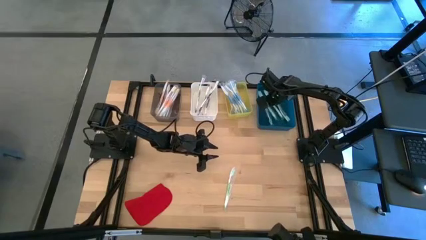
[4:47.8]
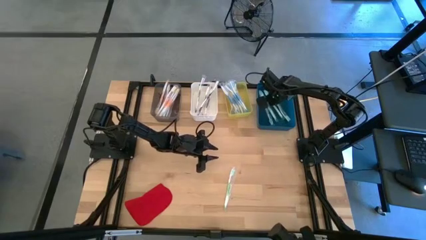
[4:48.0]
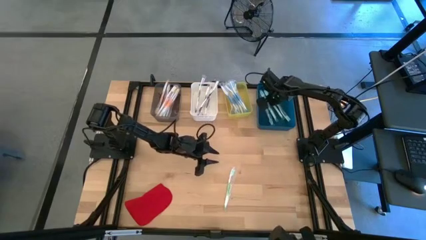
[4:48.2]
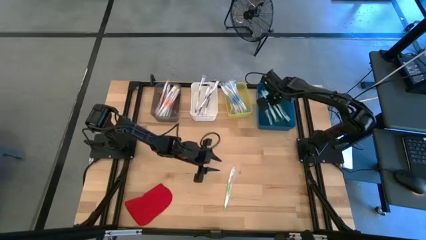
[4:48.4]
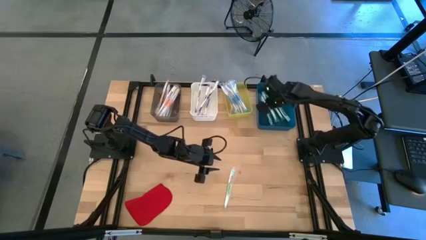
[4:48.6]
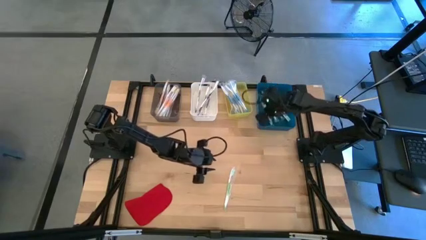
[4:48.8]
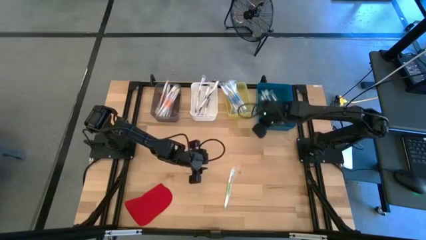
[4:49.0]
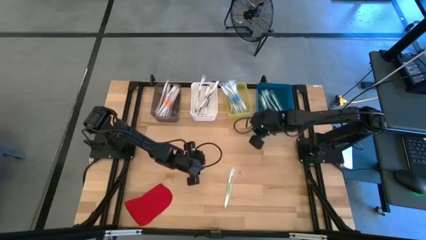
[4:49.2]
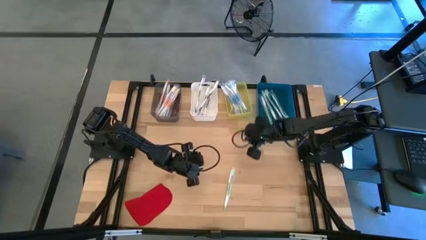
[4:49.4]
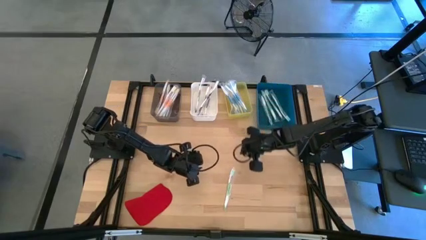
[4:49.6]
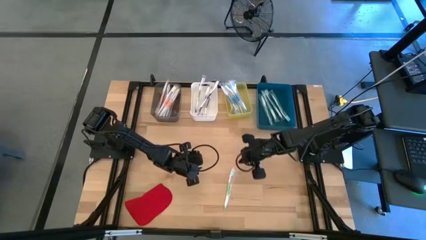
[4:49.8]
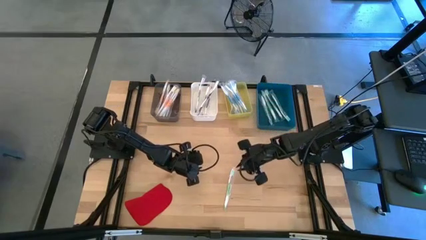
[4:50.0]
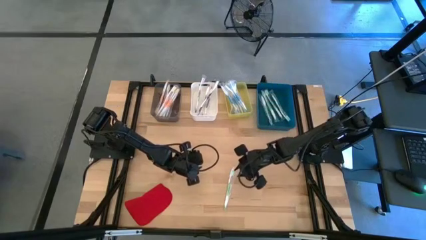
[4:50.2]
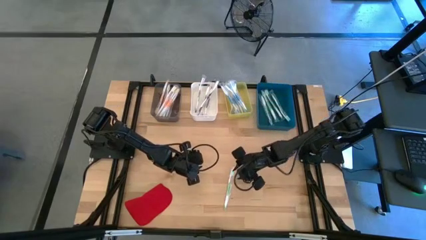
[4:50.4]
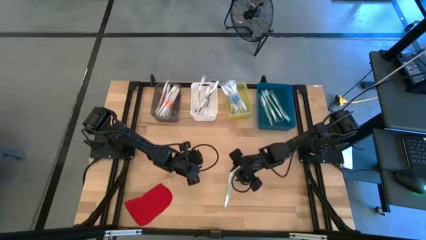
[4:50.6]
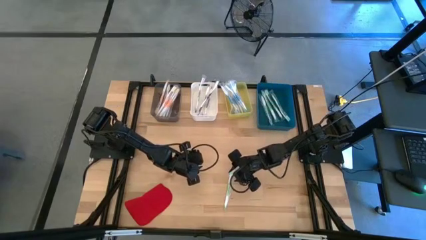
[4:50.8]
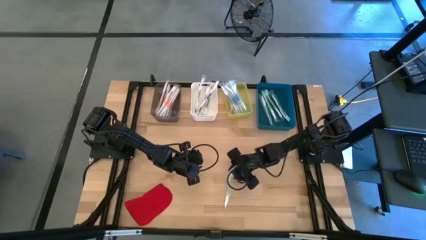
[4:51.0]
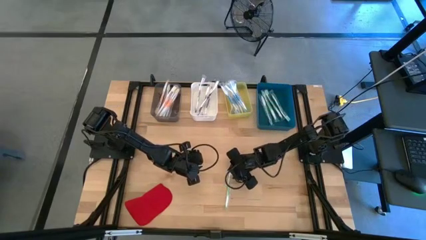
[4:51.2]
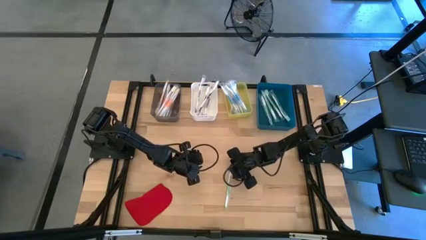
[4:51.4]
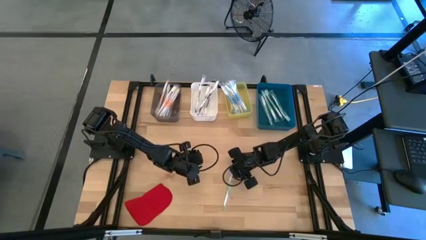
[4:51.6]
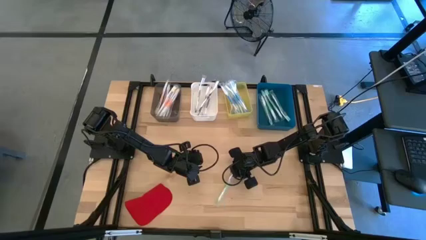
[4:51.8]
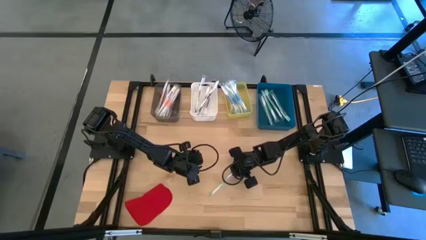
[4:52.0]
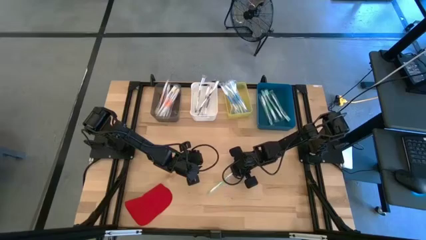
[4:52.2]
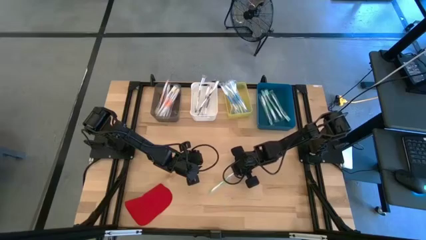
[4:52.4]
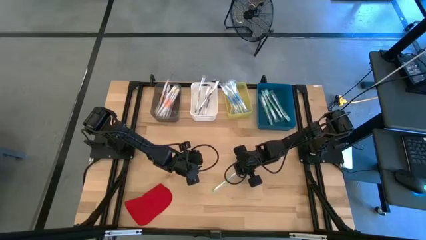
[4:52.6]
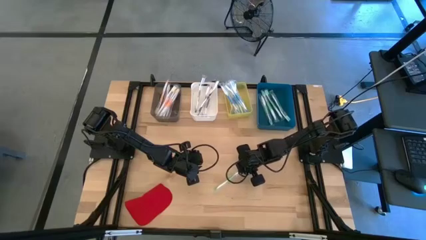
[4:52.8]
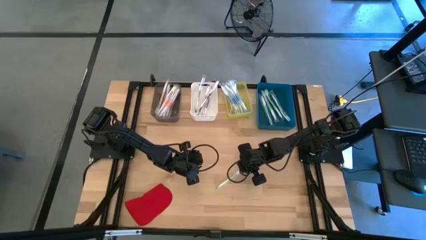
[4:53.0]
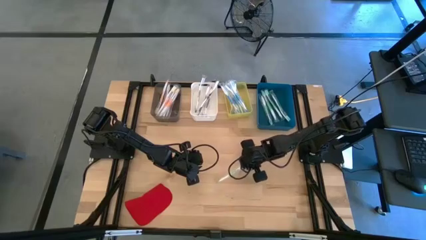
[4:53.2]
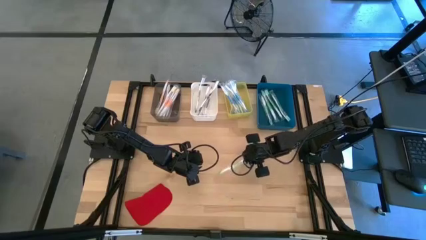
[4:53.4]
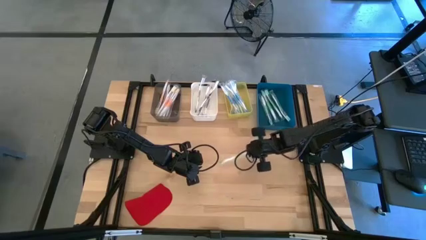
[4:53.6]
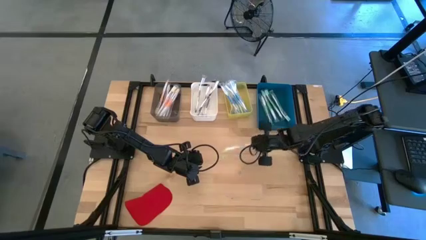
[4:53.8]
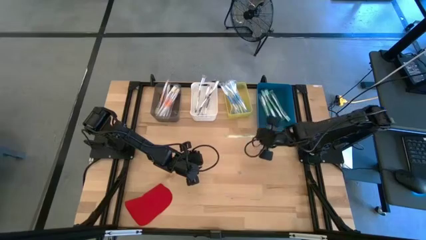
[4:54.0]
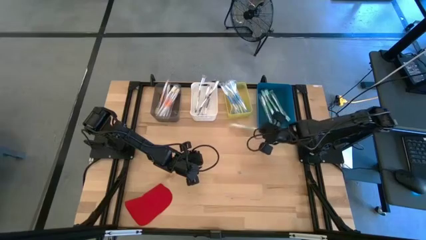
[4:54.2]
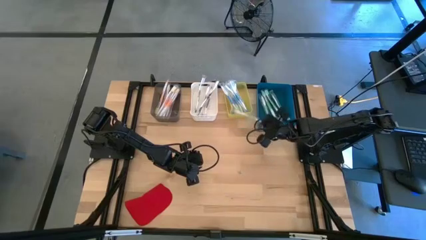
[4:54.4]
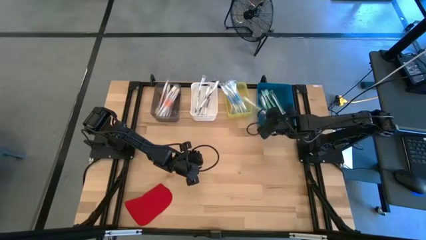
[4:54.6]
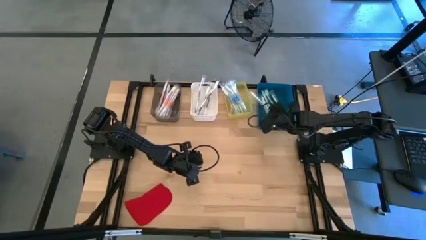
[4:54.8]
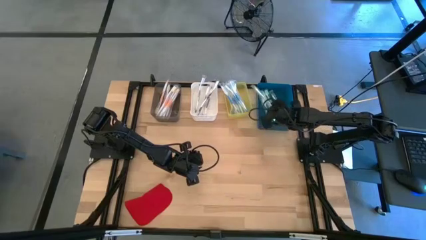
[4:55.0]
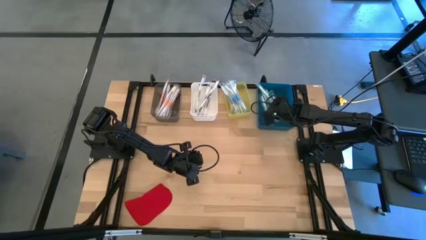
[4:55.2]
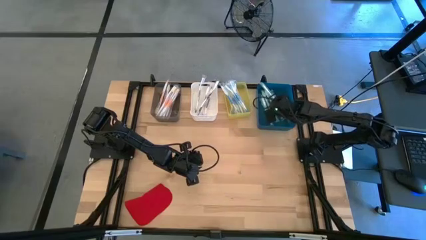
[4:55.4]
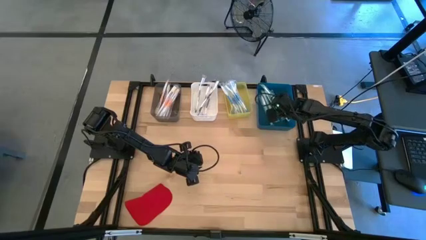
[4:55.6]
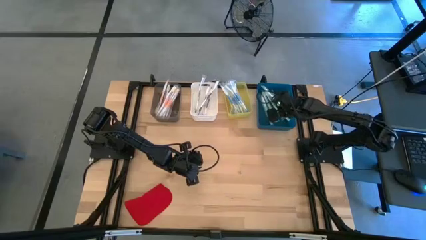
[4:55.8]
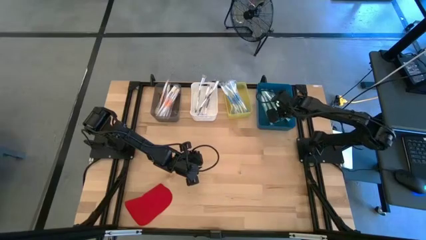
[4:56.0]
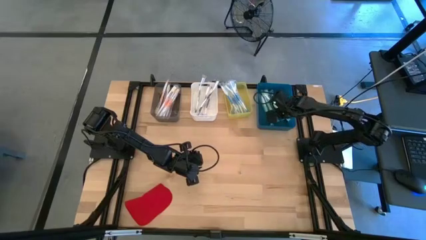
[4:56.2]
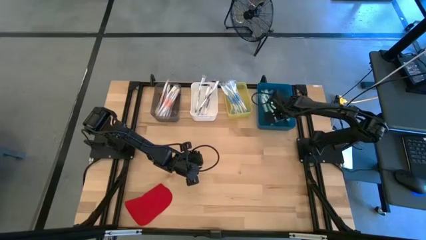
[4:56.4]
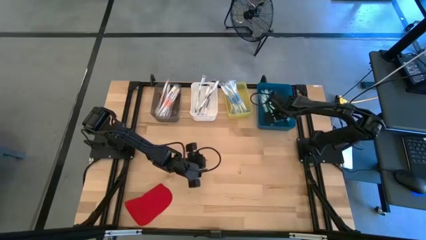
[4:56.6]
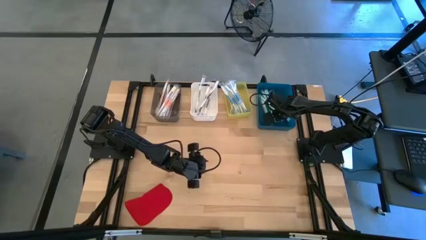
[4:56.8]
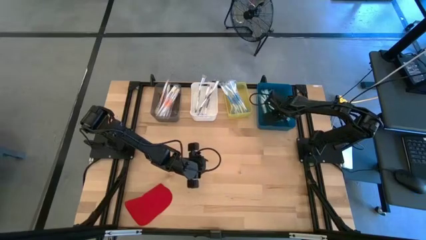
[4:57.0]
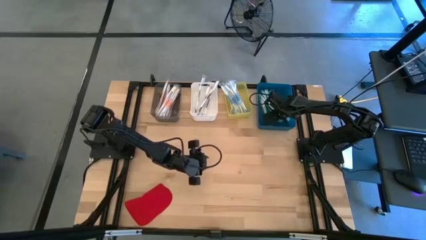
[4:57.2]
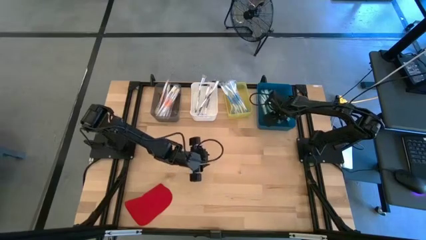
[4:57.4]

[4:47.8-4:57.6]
Task: Pick & Place Toothbrushes
Put the green toothbrush into the blue bin

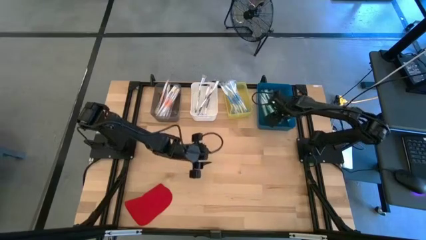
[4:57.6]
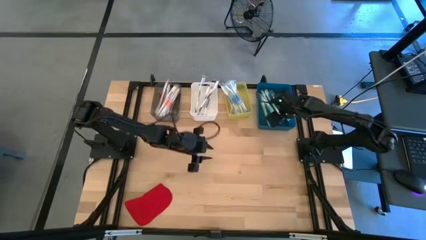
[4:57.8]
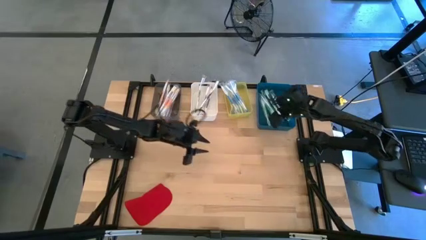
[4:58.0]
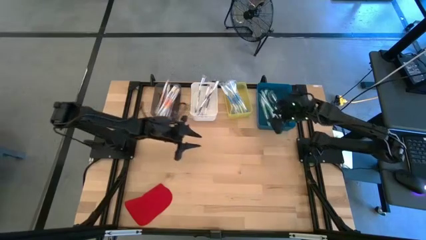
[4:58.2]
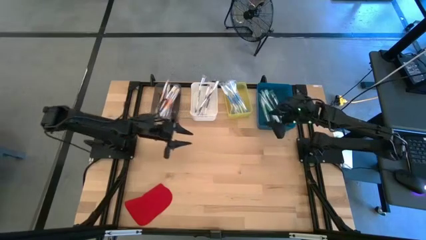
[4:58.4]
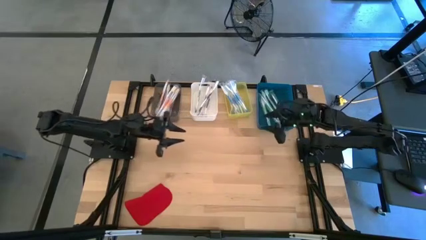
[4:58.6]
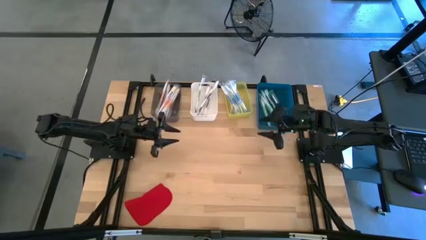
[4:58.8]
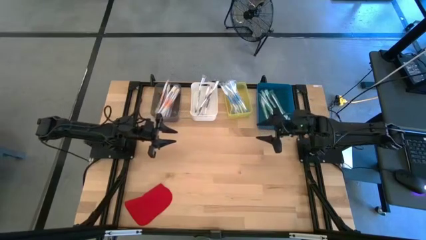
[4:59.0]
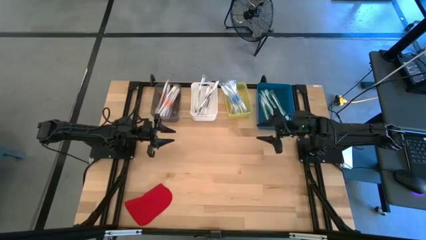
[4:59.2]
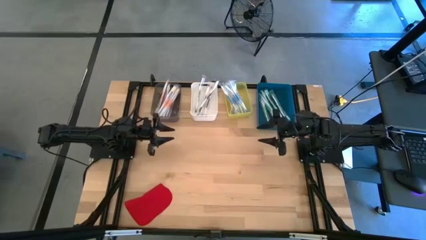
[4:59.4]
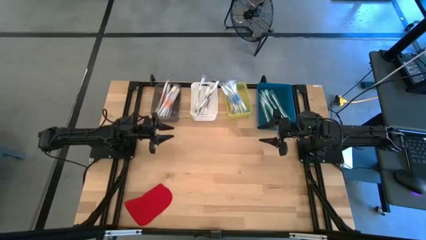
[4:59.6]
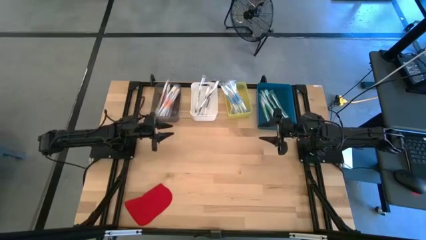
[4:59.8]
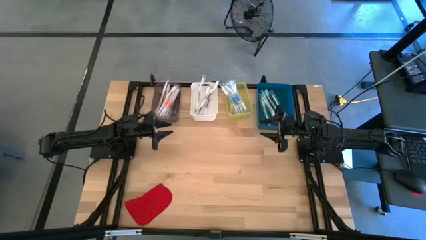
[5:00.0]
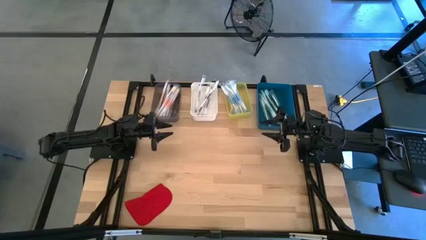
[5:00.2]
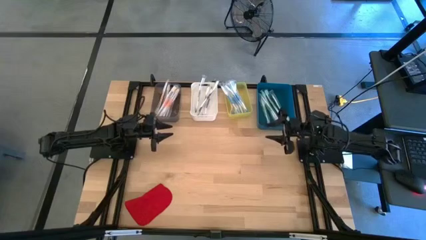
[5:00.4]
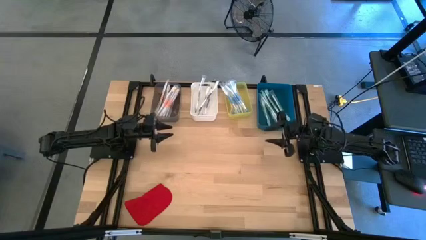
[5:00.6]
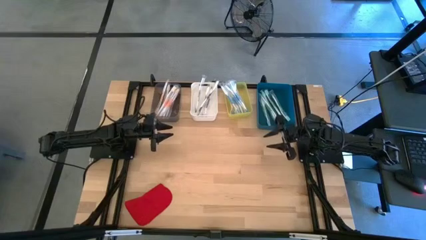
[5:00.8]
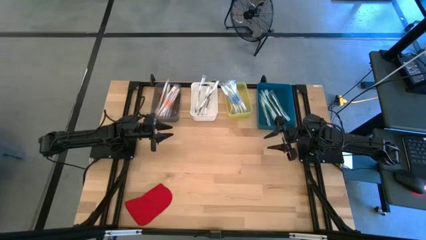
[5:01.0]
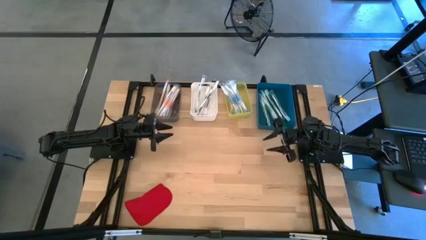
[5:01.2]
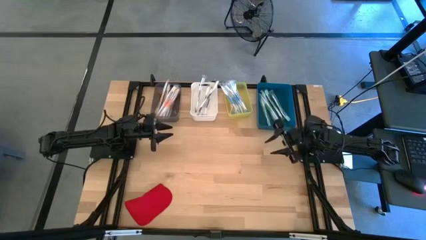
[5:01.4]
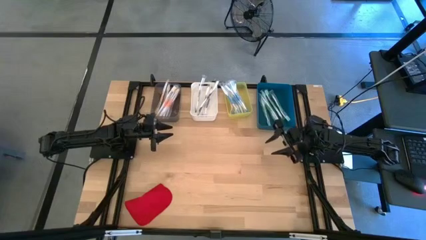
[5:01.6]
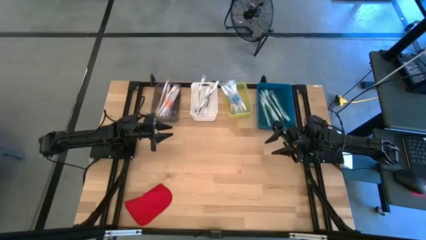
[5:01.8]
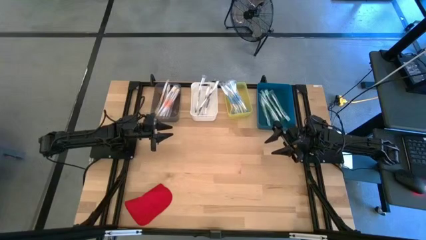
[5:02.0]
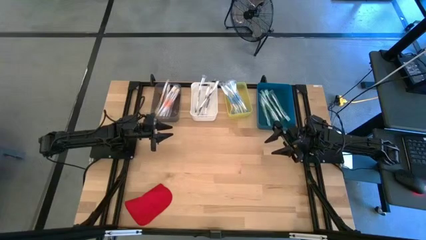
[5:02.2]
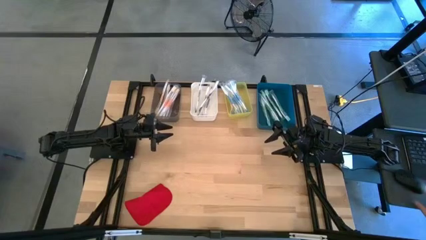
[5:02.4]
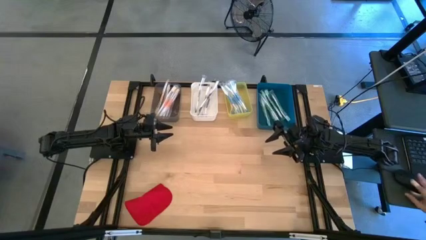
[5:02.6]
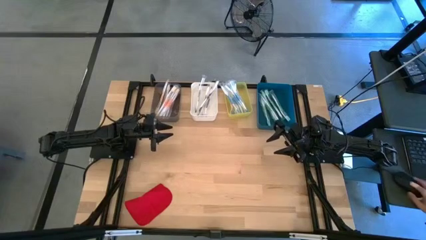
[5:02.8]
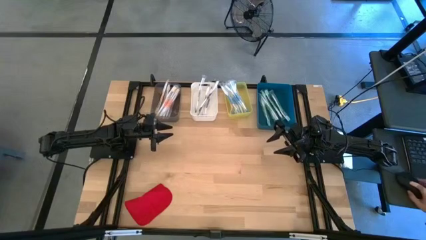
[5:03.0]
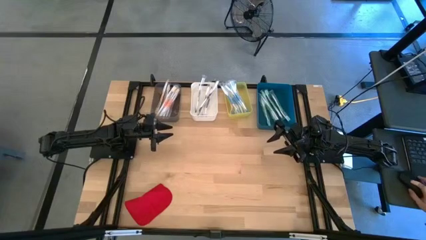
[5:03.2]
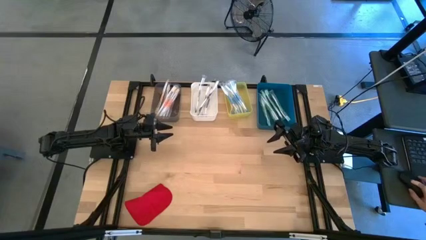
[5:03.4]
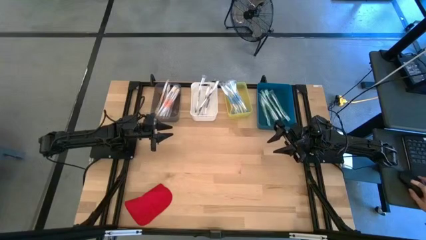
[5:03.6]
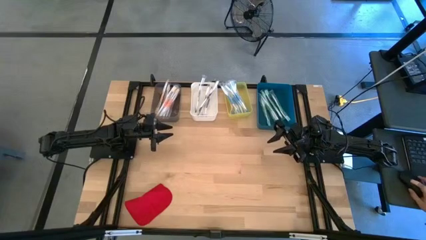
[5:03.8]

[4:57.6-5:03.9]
Return to Home Position
